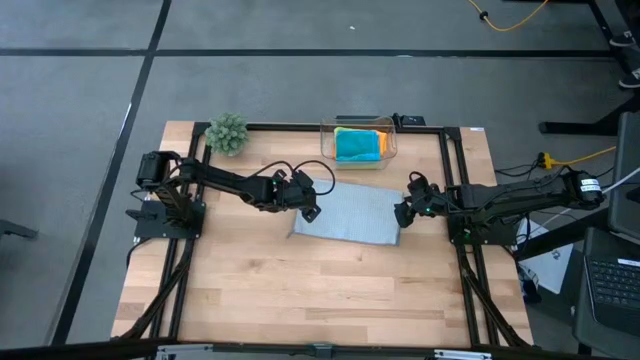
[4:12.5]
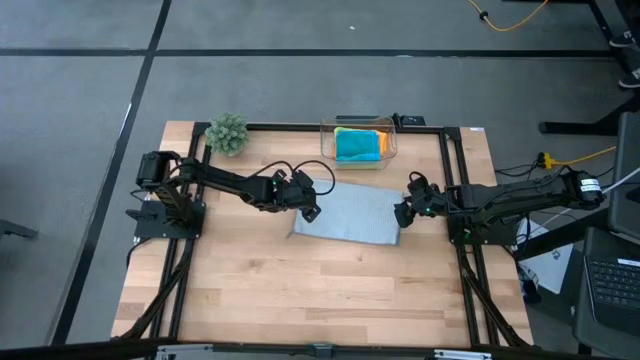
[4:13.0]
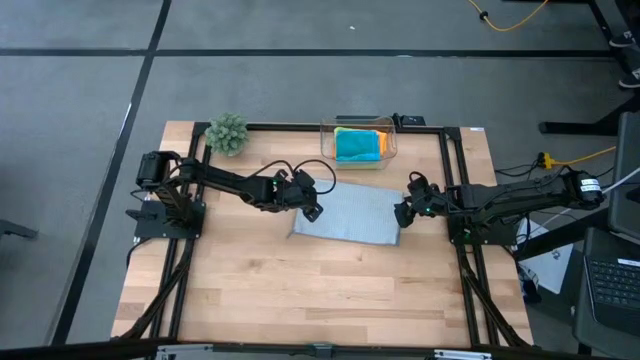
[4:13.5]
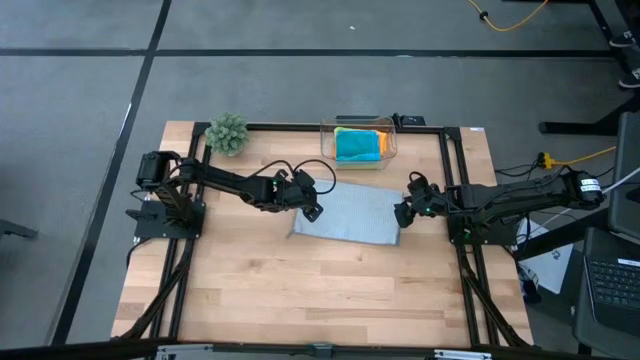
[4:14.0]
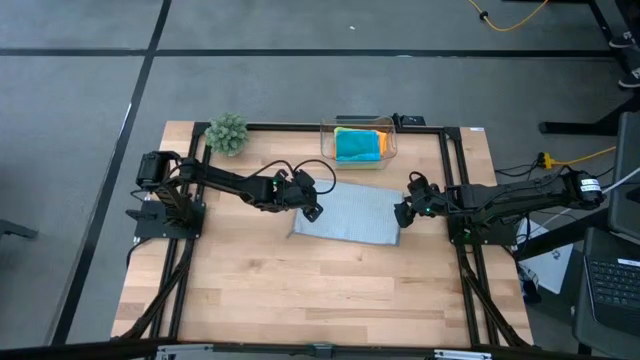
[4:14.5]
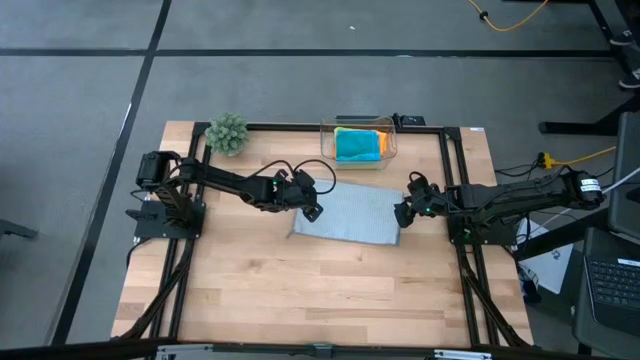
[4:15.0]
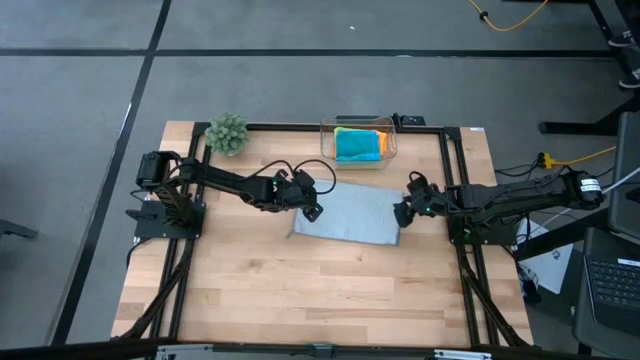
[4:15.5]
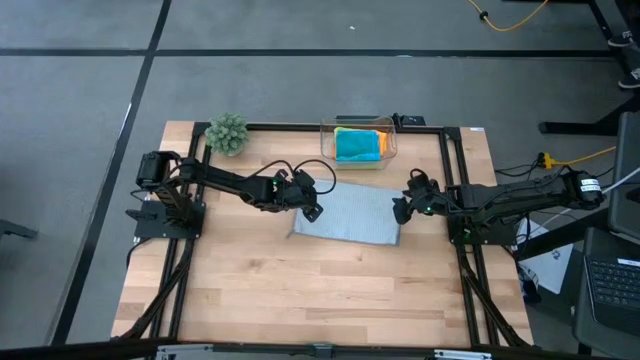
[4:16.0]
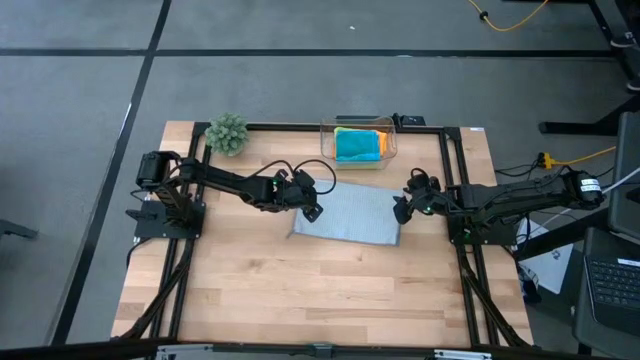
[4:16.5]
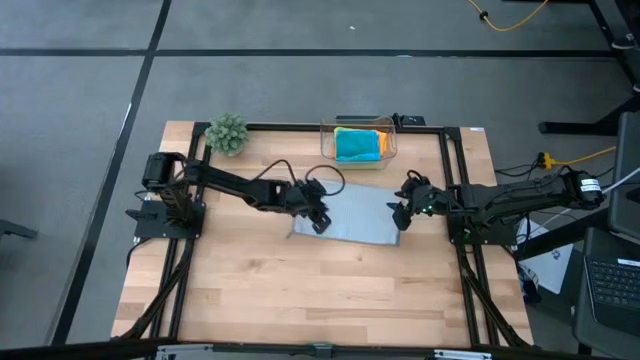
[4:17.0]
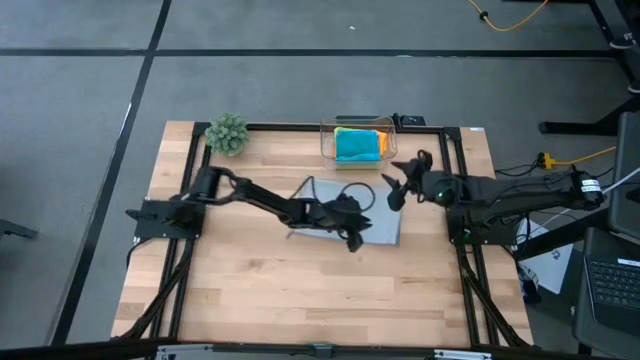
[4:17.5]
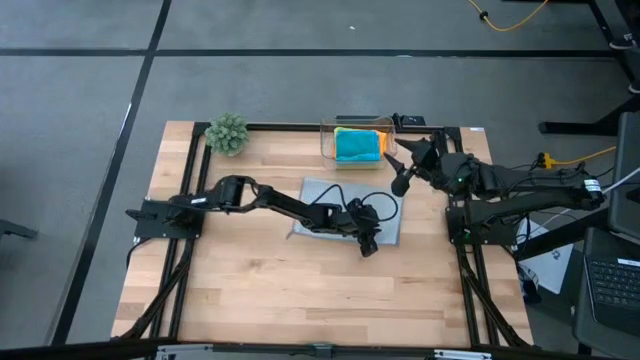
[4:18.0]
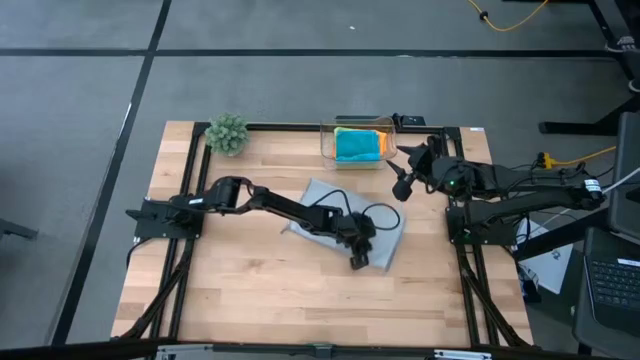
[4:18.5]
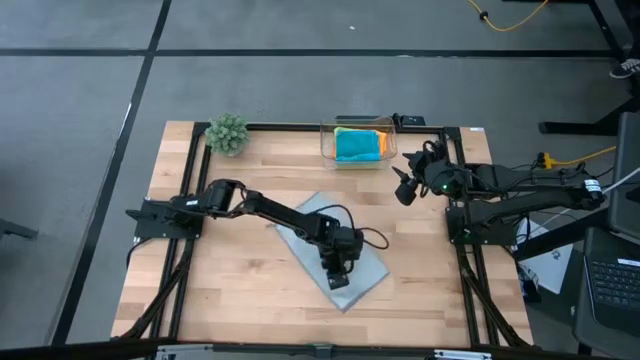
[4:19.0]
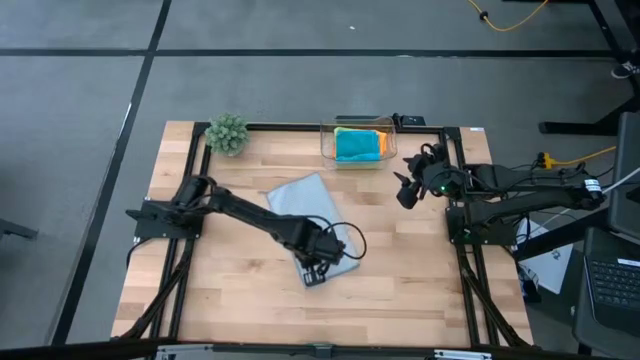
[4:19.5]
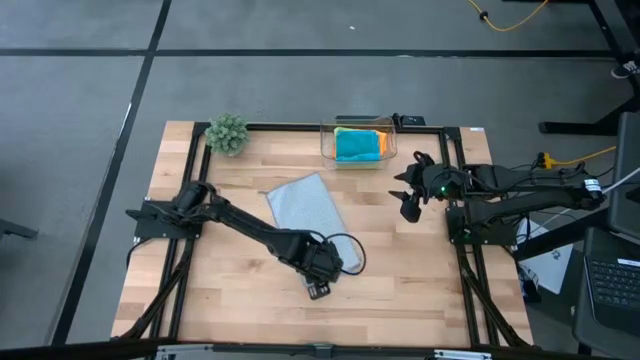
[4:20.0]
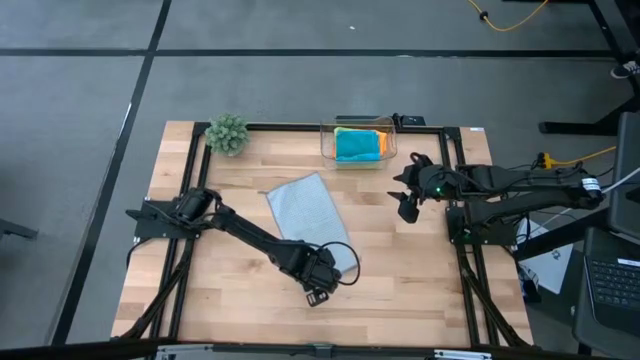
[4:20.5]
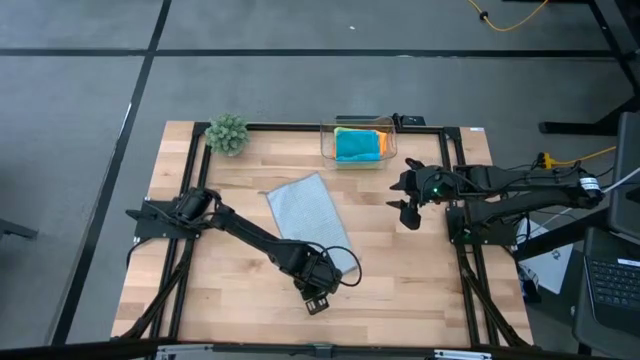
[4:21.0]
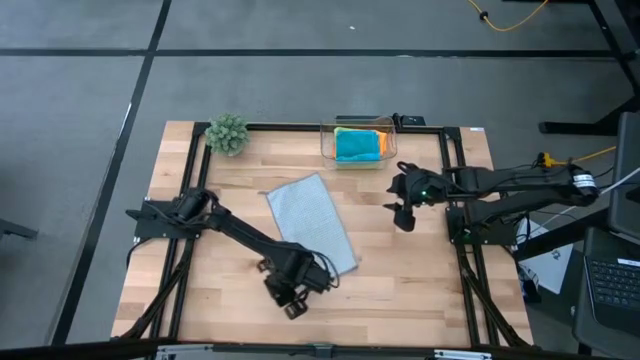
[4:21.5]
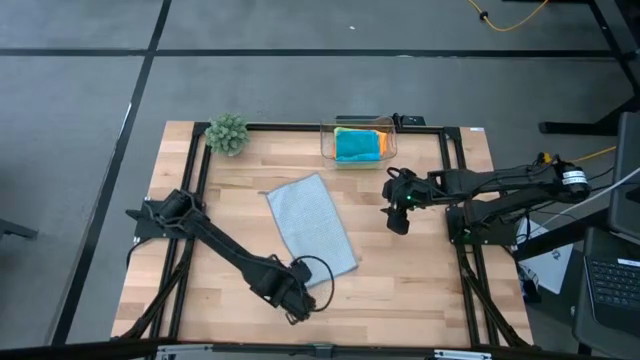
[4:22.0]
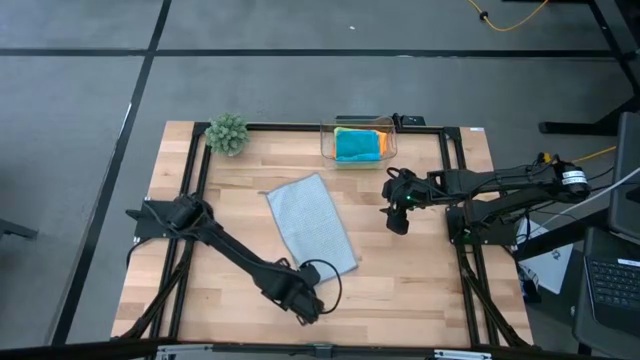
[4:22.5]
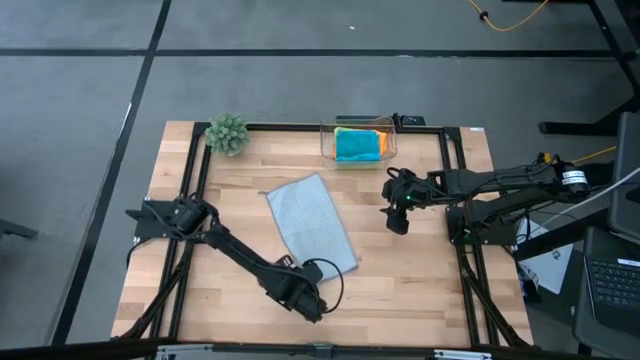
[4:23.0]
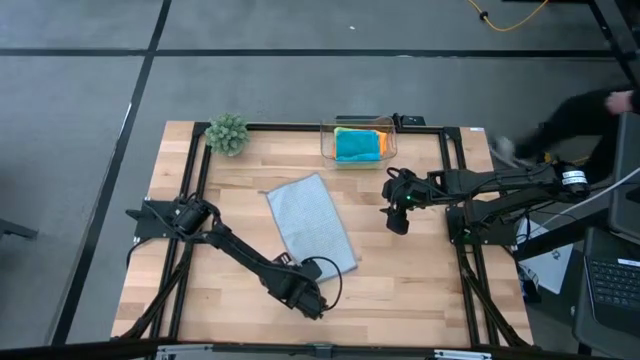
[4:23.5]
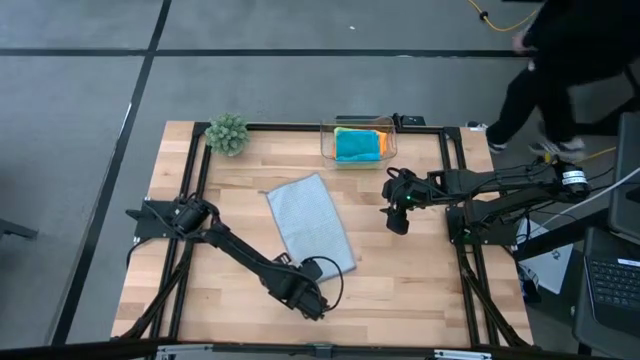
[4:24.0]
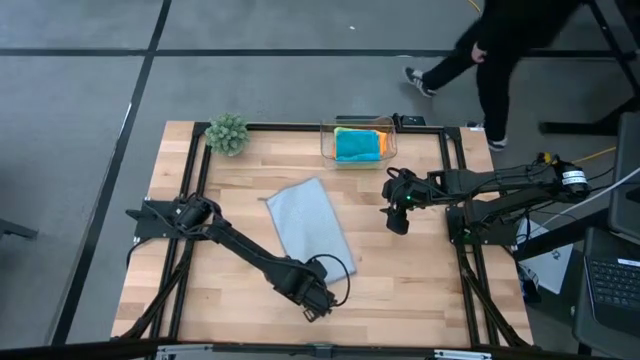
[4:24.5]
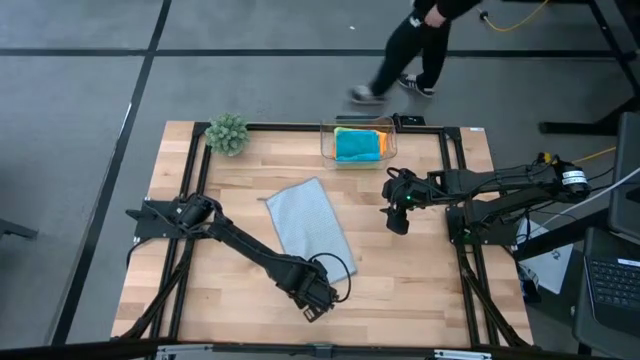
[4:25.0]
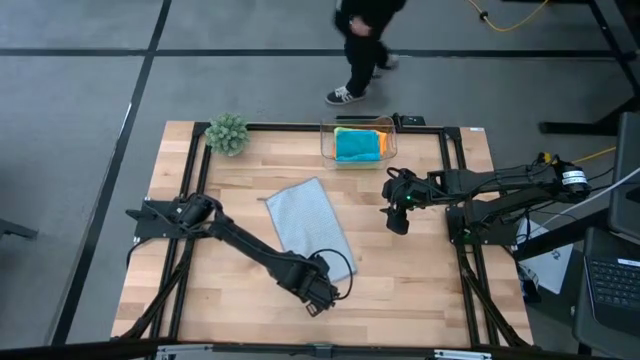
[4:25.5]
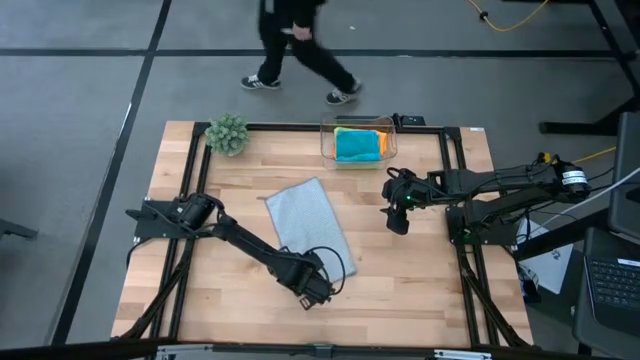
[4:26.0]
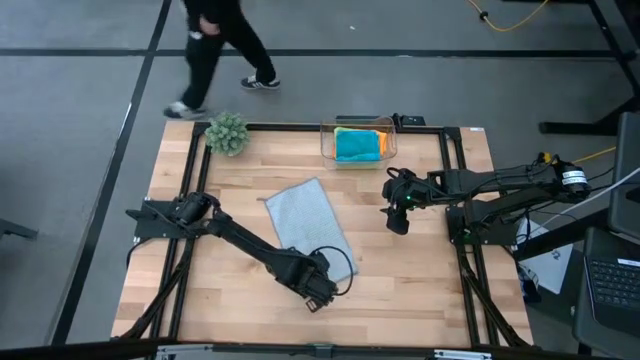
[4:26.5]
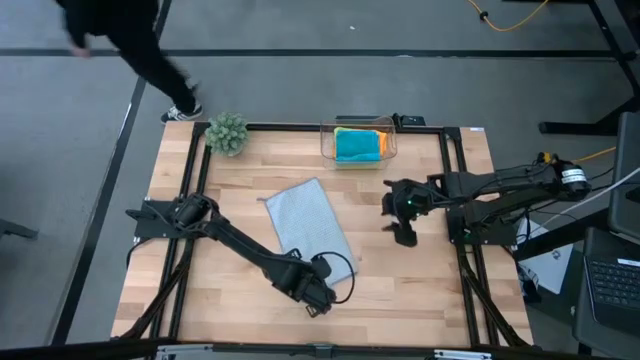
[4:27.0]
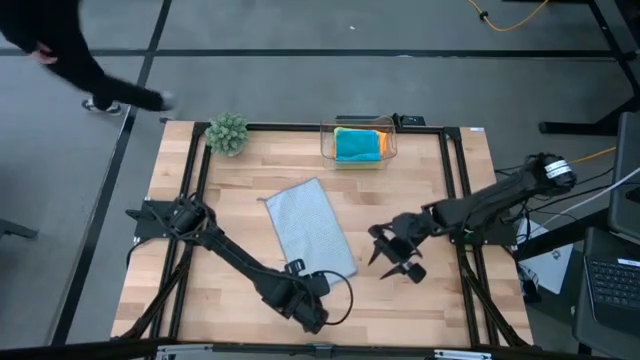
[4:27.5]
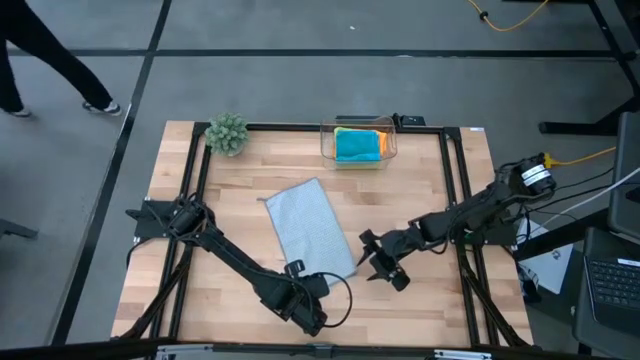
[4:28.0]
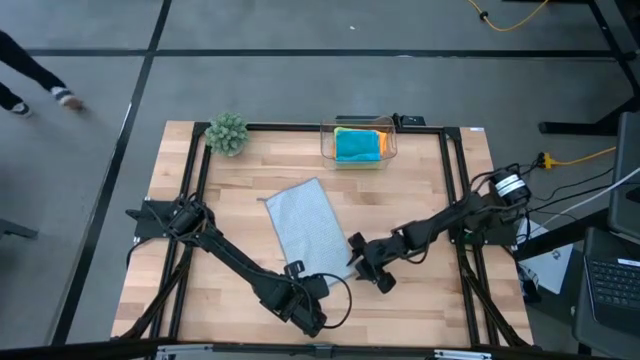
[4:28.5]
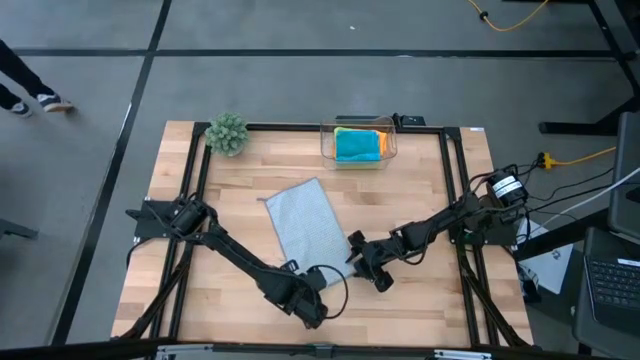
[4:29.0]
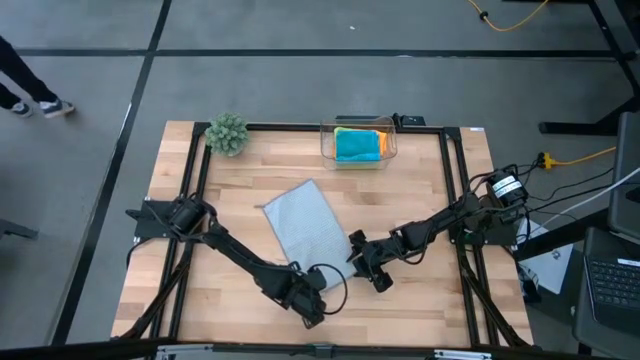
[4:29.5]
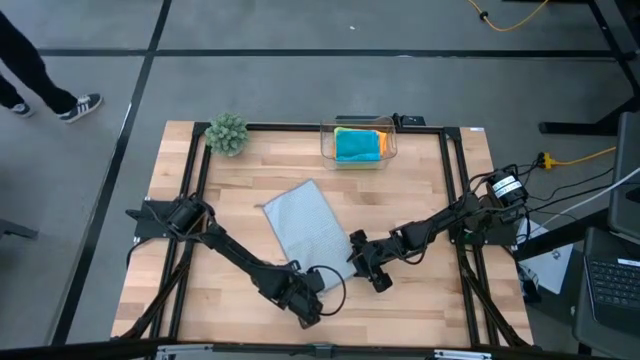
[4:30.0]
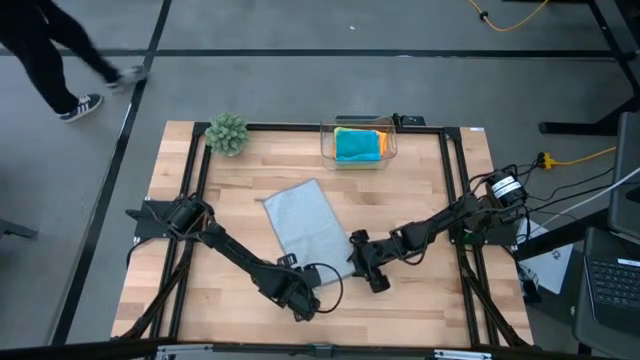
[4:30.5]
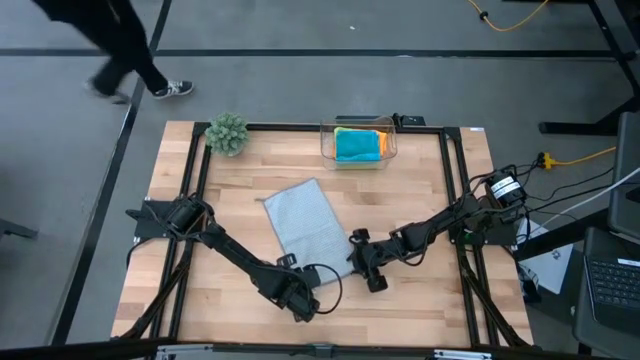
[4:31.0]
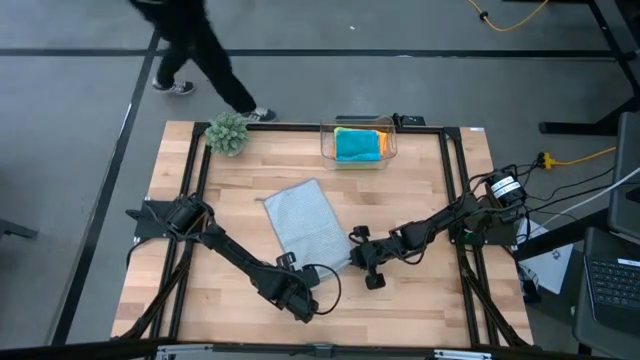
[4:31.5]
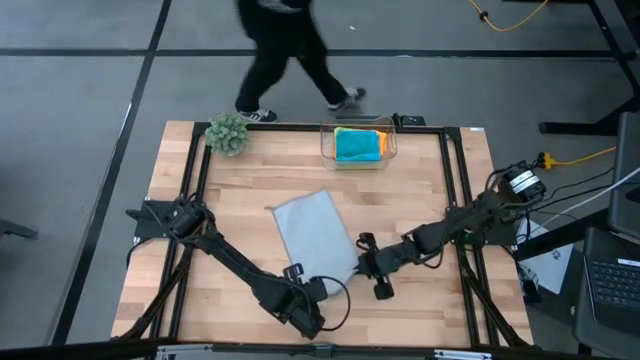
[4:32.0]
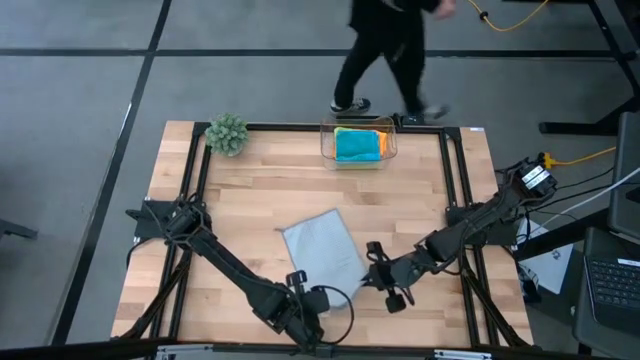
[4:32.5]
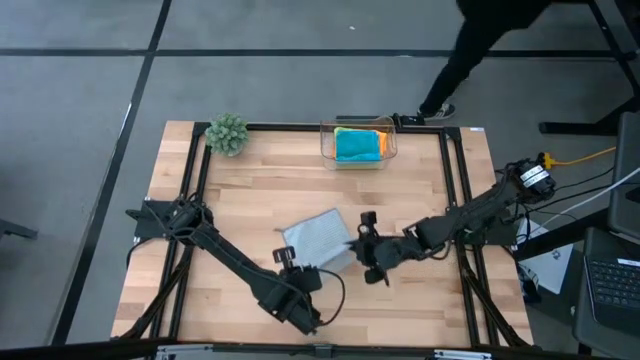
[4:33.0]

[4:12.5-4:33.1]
Task: Fold microfiber towels
Fold the gray microfiber cloth
